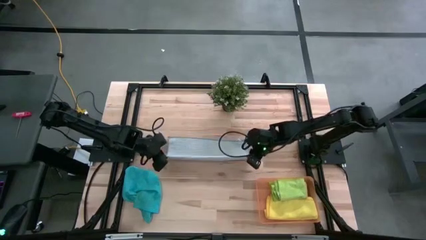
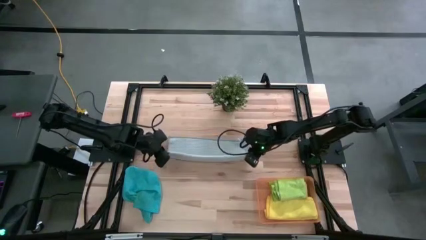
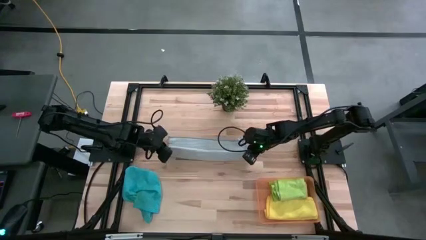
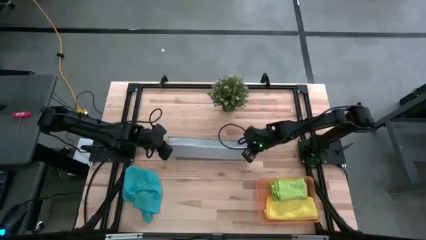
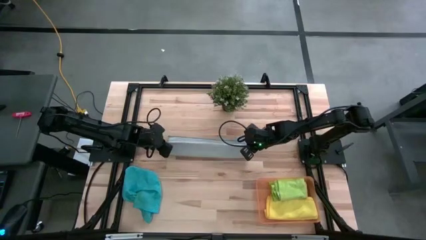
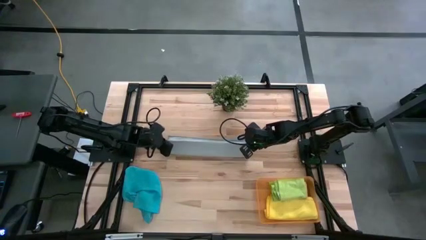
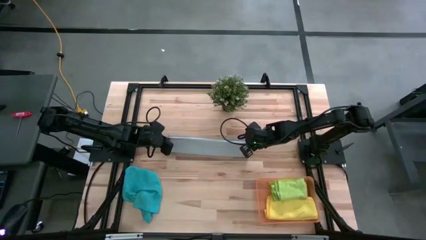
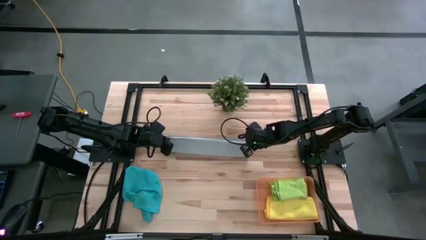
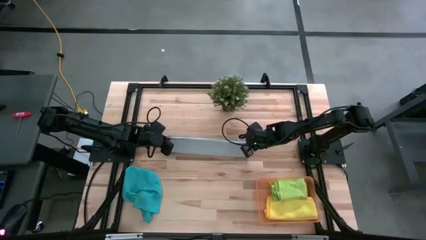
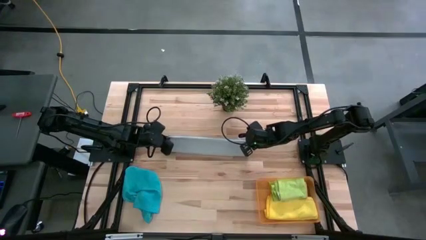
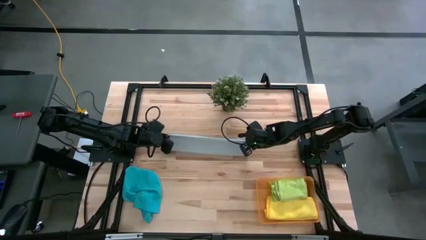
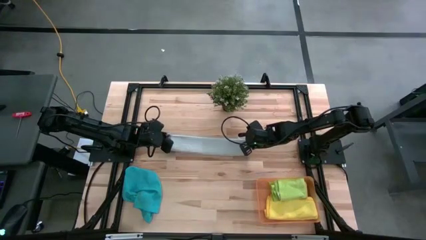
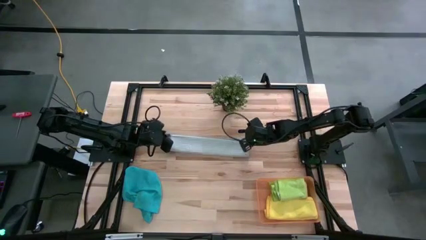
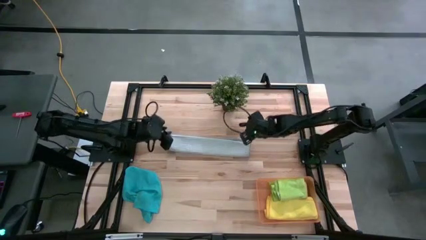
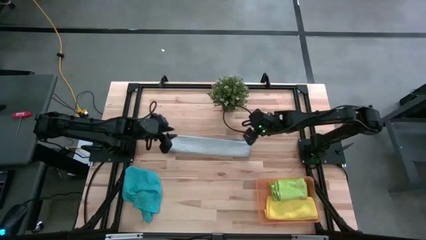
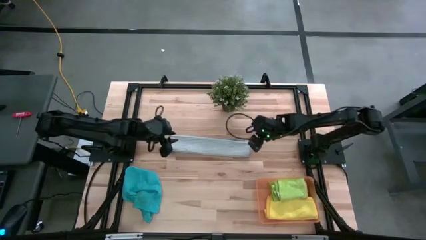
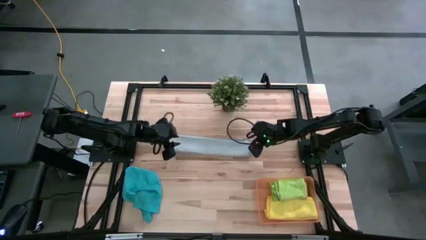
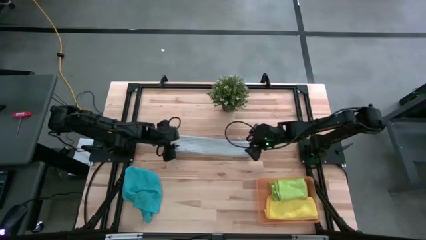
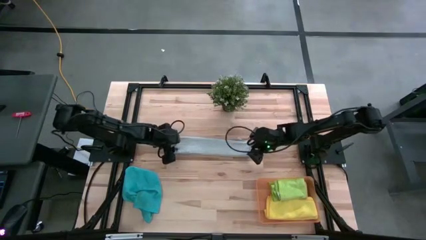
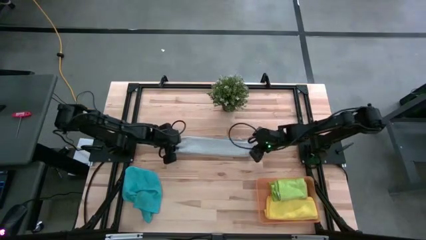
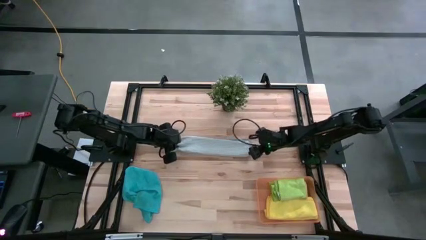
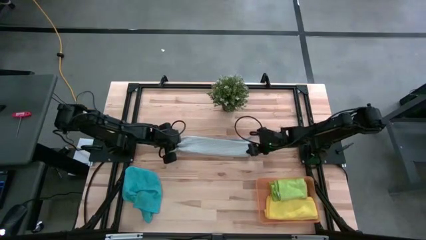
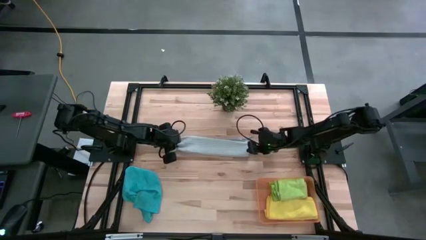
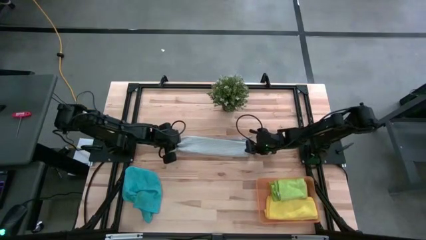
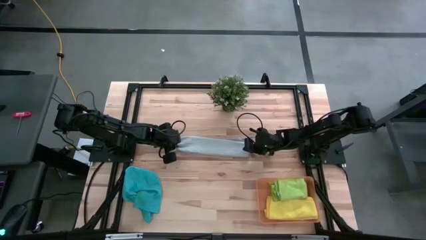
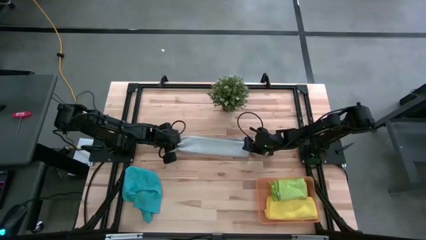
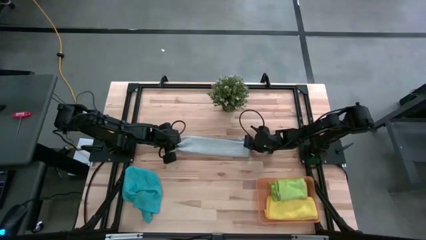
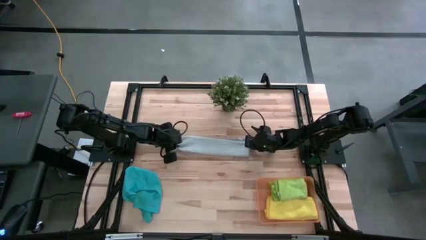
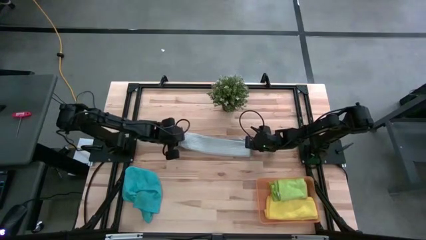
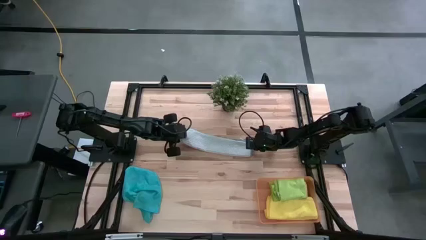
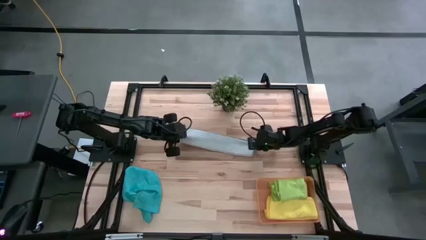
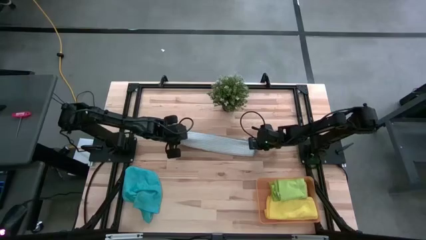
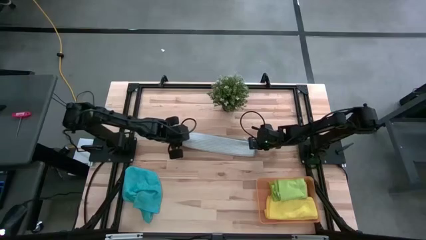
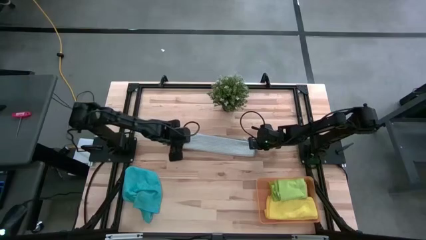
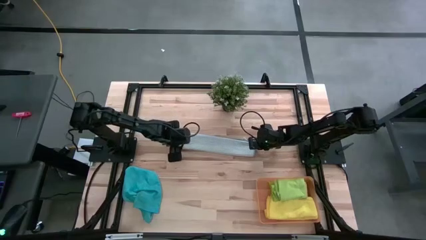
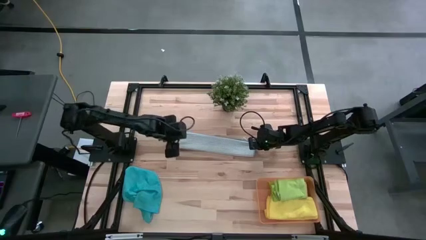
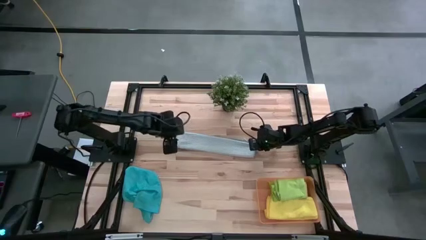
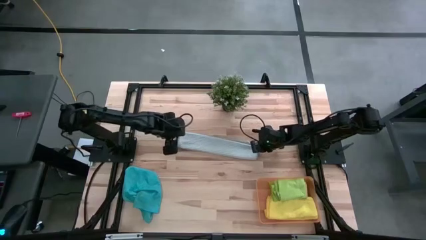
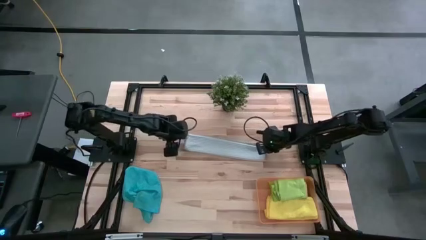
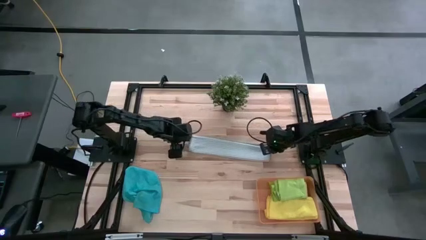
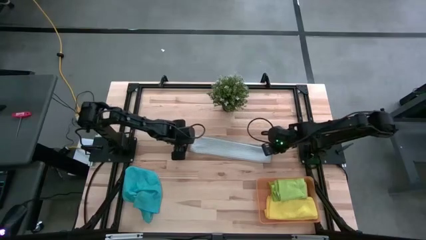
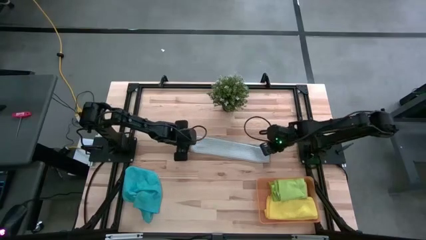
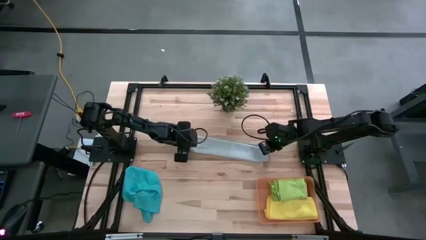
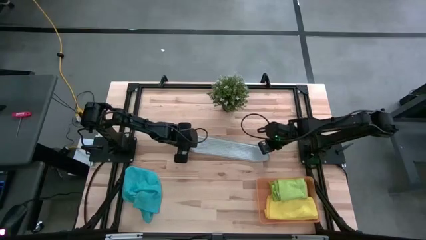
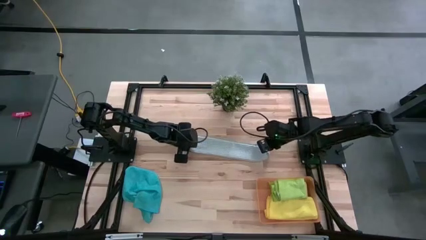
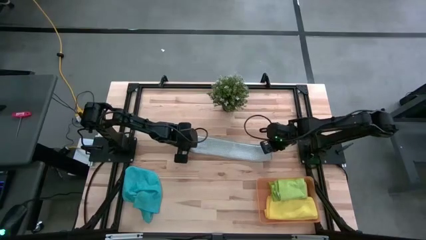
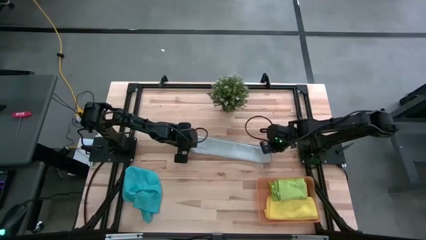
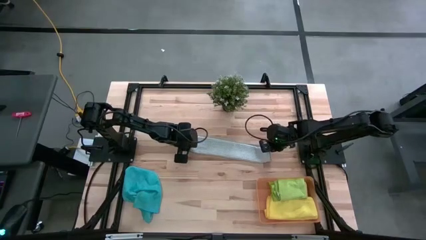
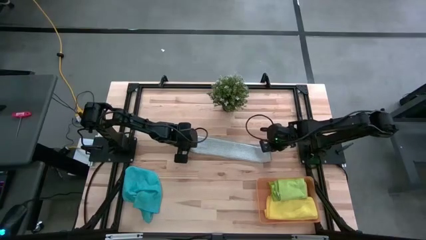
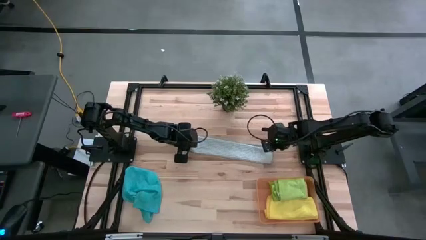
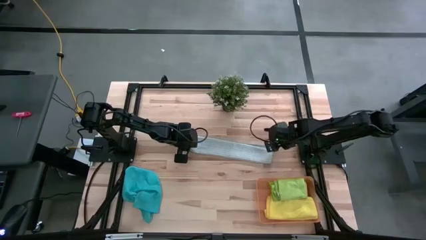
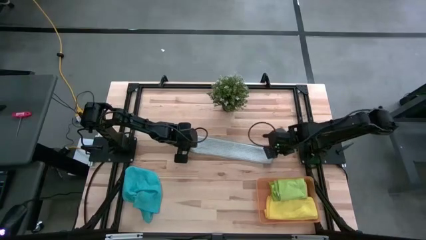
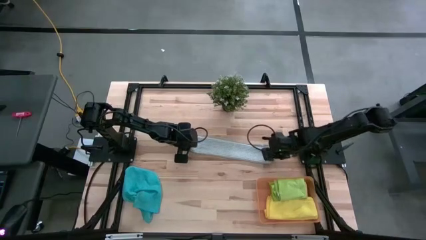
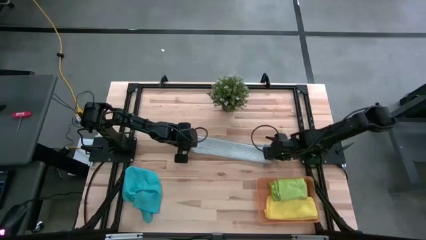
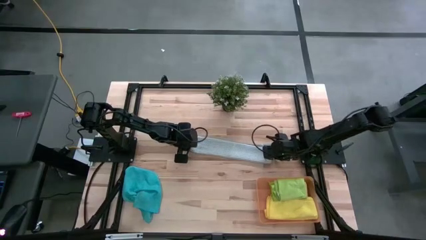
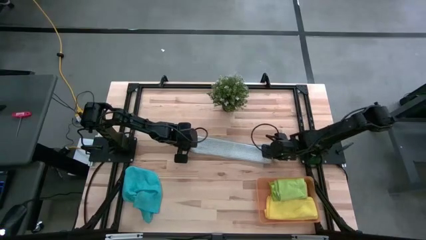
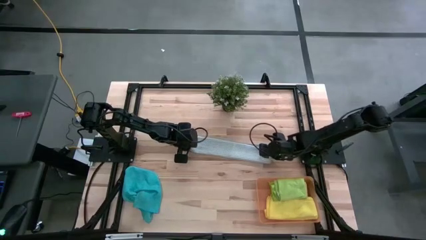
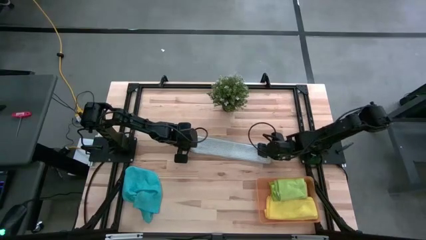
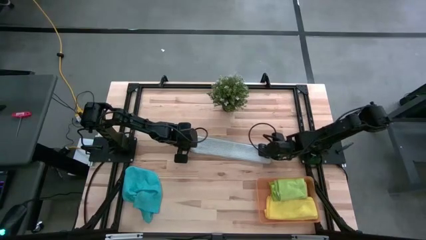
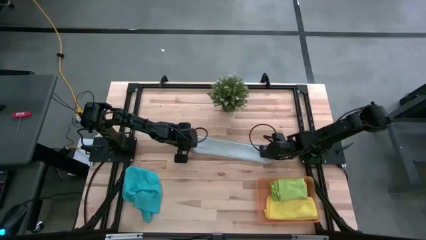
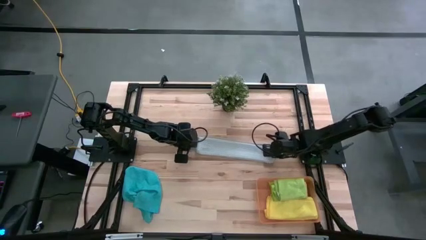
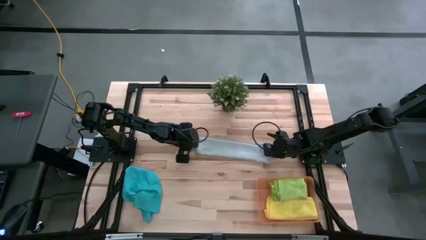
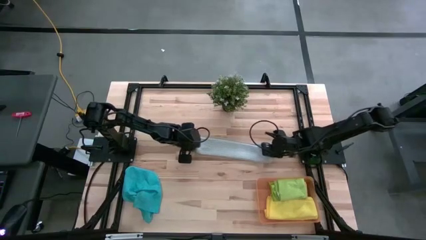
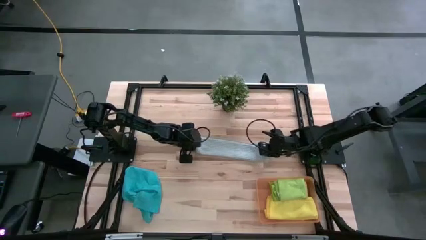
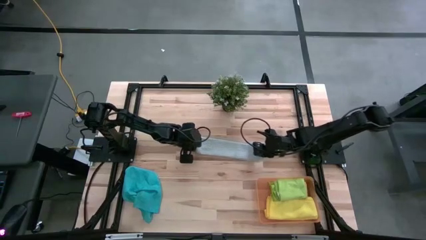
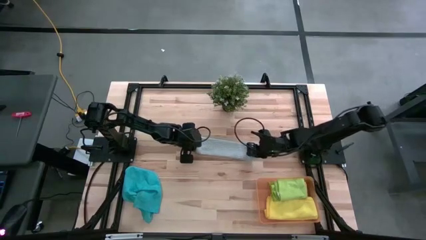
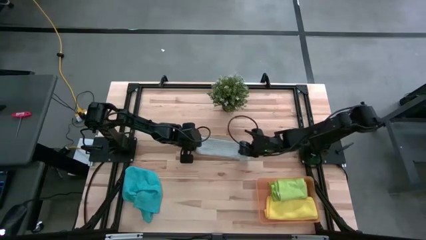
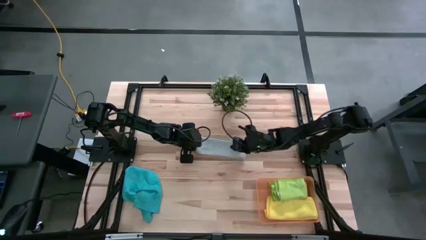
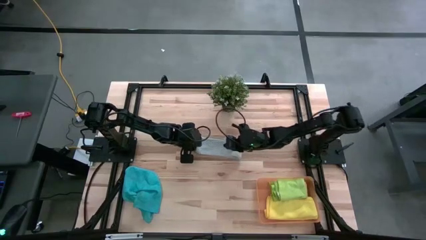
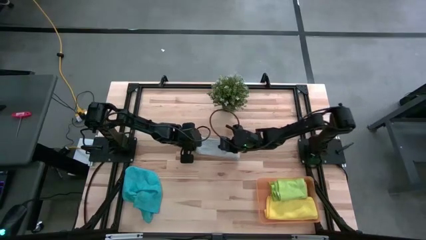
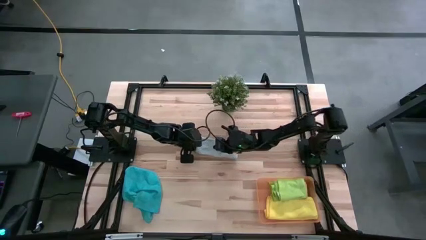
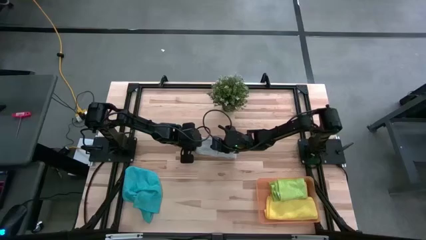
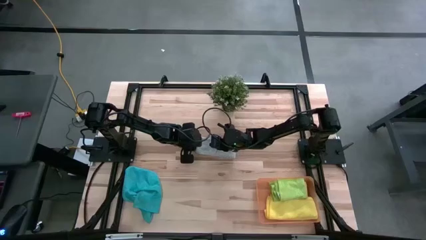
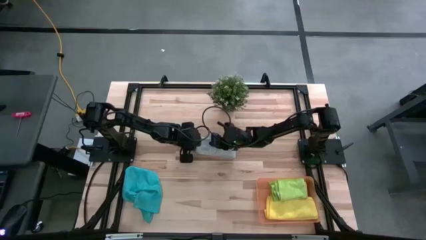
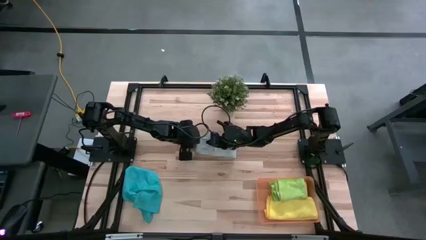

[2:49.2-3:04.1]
Task: Fold microfiber towels
Fold the gray microfiber towel

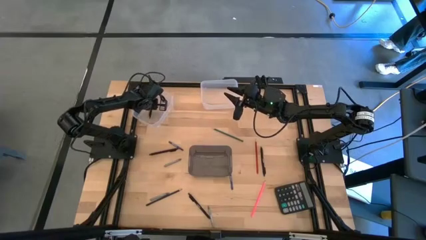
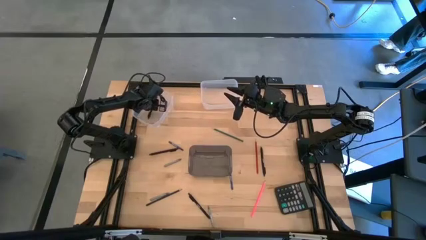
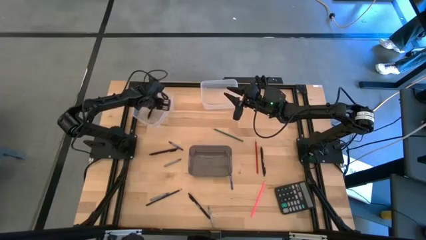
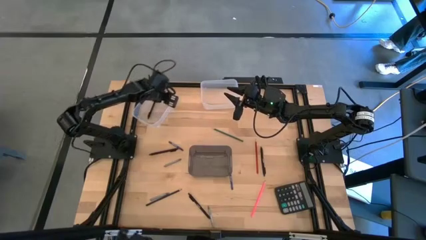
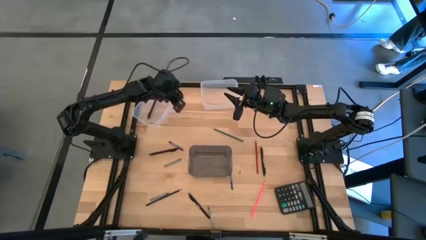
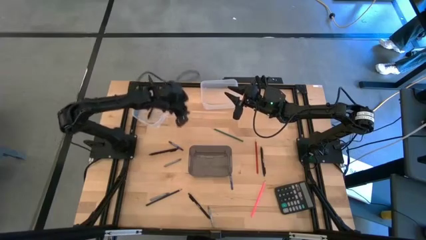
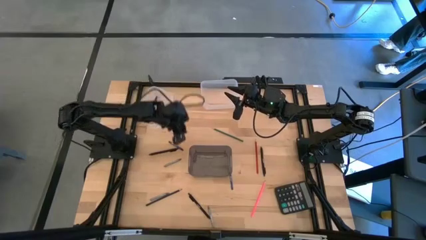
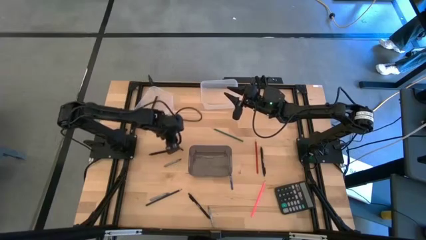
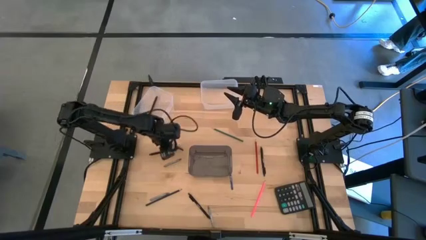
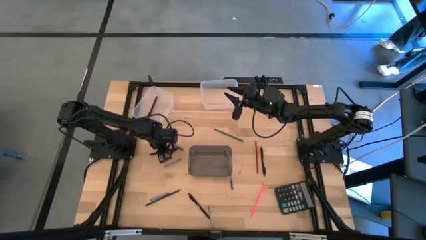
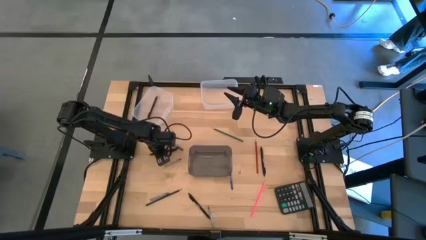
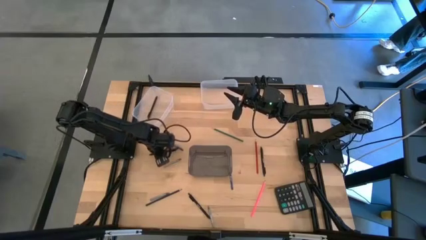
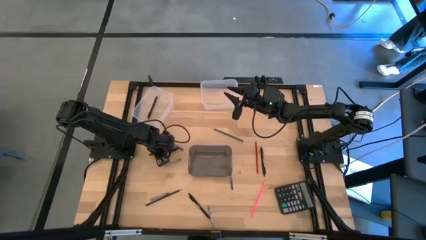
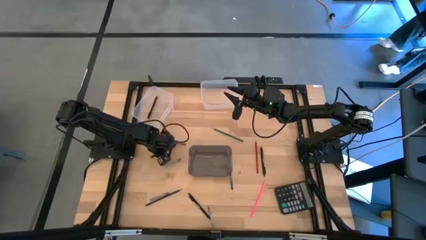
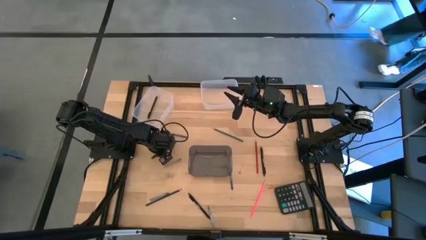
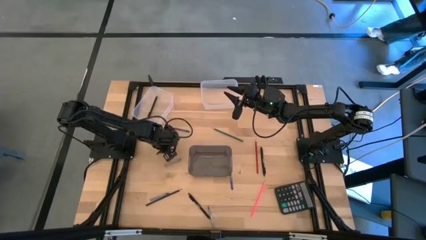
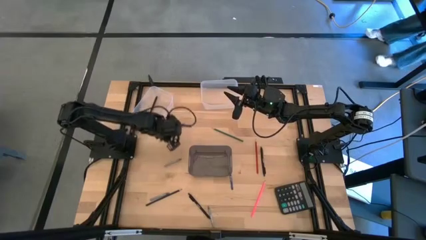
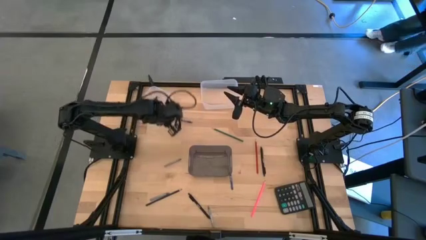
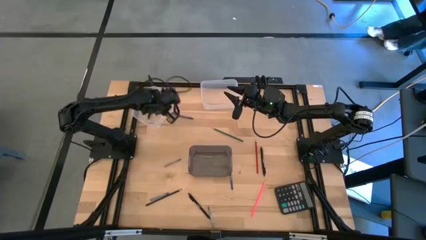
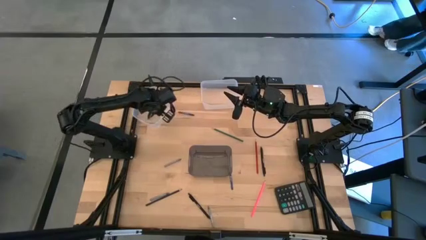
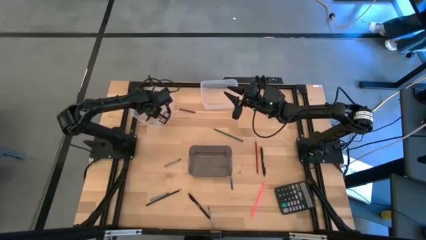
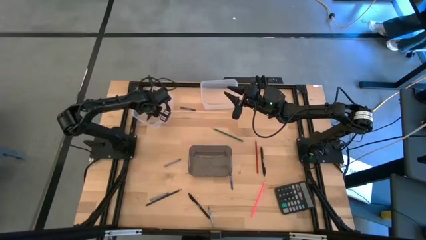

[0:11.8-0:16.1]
Task: Sort crayons/erasers/pens/pencils in bins
Put the black pen into the left transparent bin
